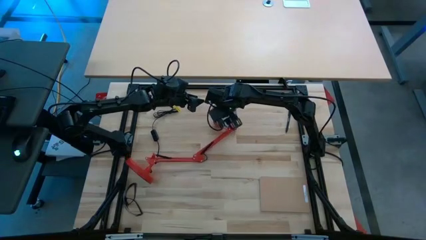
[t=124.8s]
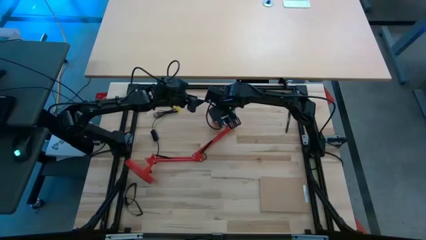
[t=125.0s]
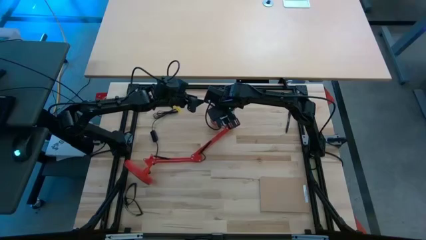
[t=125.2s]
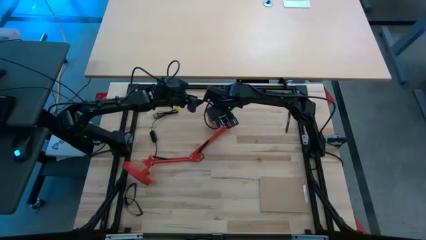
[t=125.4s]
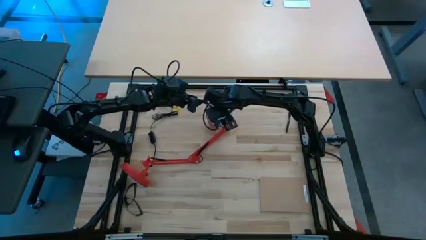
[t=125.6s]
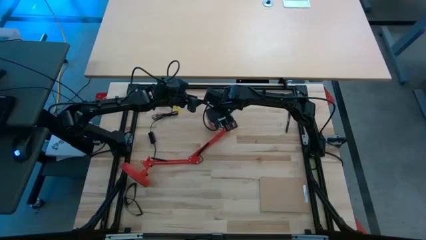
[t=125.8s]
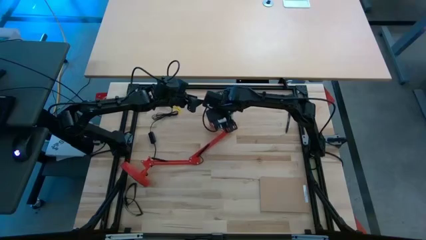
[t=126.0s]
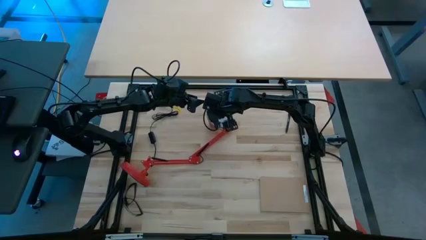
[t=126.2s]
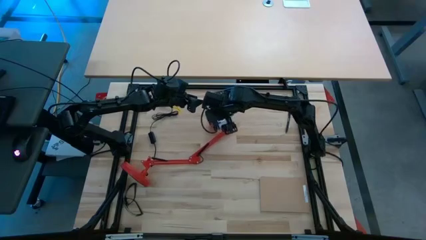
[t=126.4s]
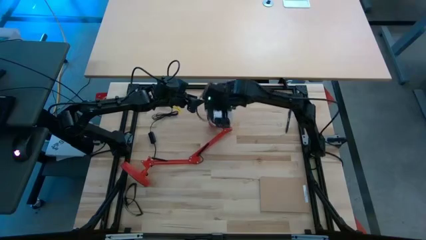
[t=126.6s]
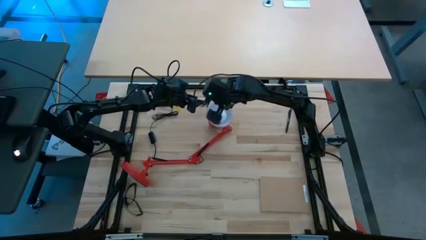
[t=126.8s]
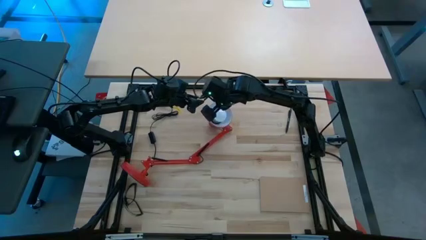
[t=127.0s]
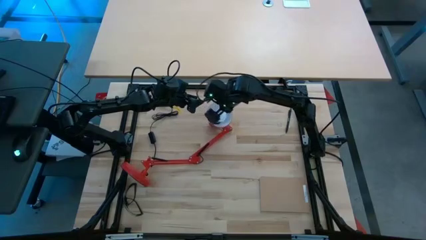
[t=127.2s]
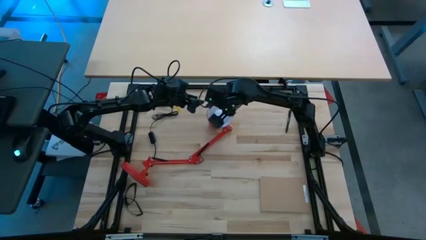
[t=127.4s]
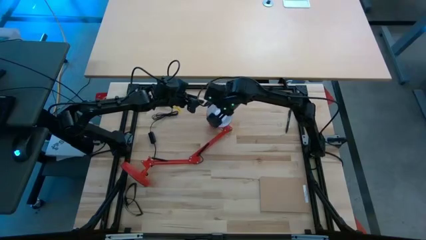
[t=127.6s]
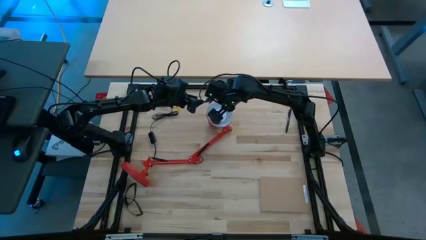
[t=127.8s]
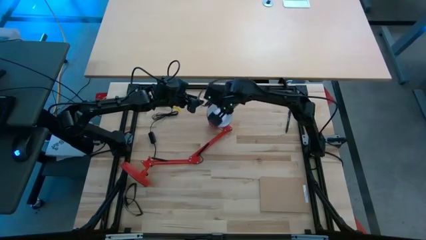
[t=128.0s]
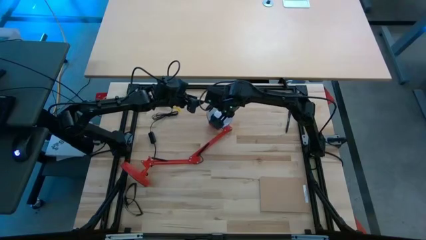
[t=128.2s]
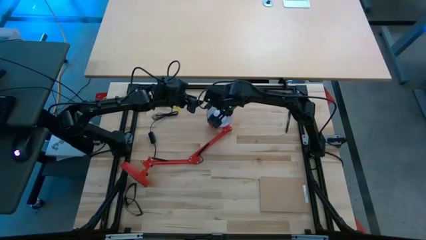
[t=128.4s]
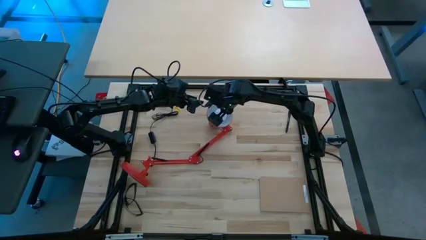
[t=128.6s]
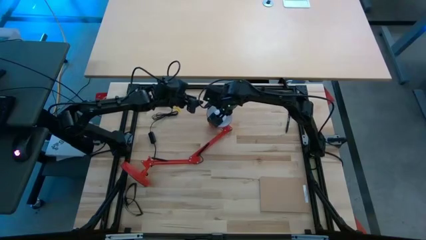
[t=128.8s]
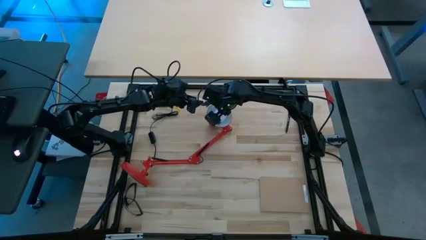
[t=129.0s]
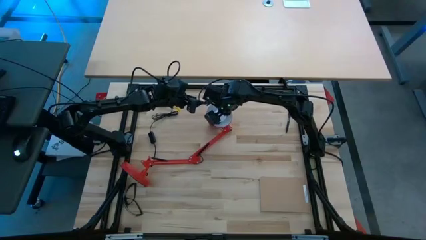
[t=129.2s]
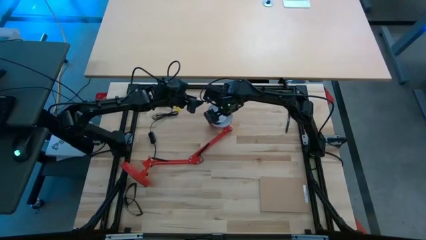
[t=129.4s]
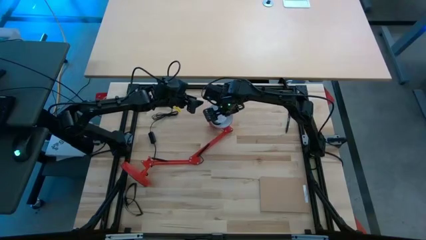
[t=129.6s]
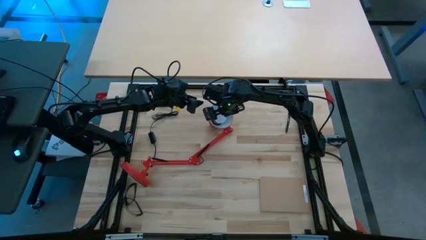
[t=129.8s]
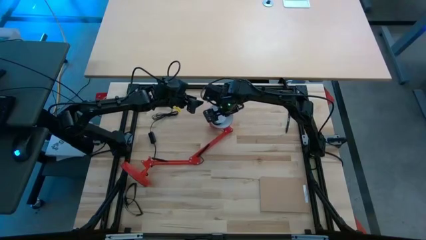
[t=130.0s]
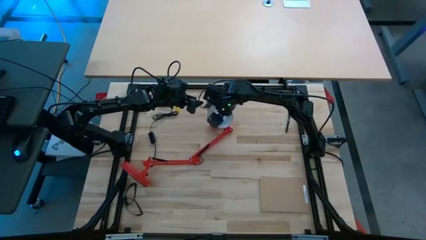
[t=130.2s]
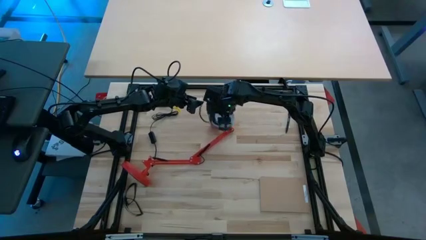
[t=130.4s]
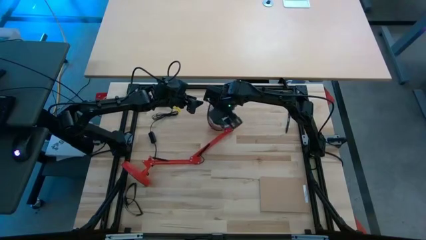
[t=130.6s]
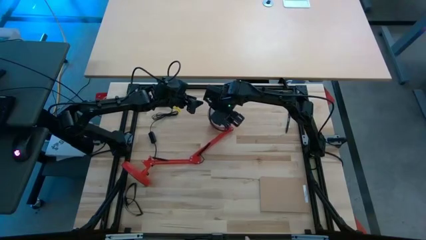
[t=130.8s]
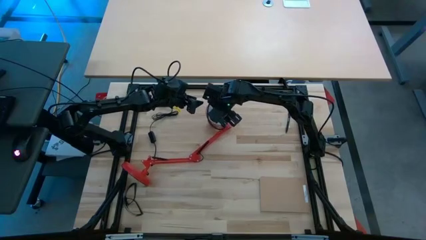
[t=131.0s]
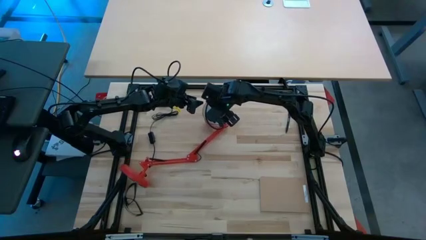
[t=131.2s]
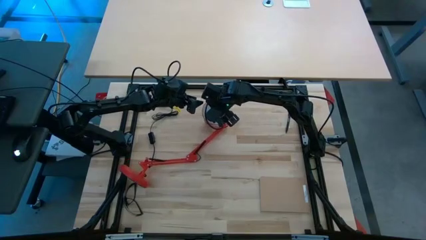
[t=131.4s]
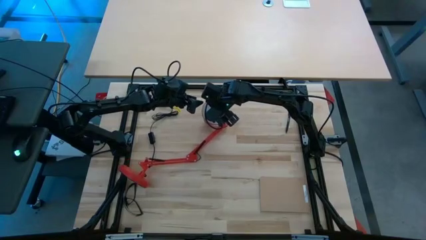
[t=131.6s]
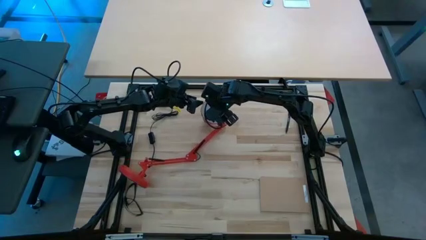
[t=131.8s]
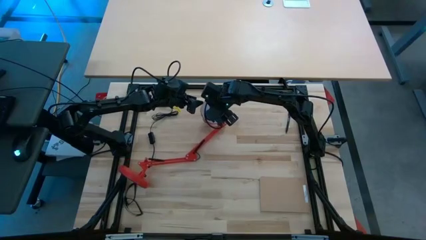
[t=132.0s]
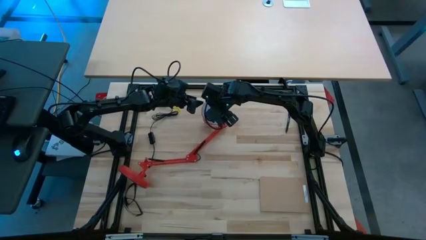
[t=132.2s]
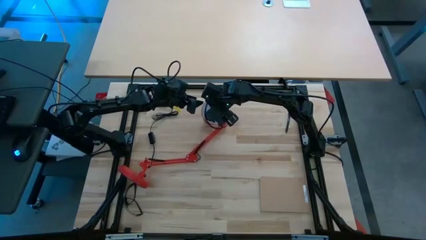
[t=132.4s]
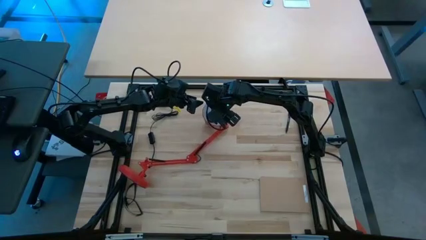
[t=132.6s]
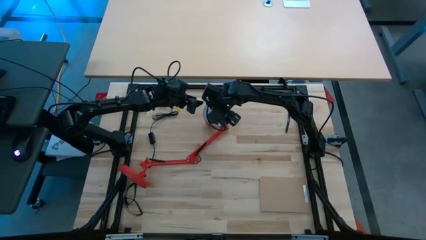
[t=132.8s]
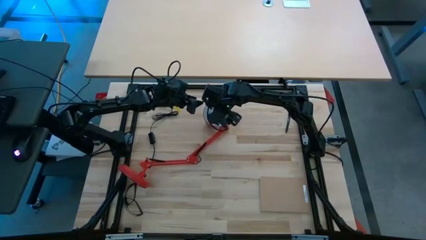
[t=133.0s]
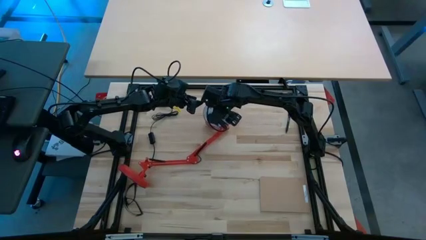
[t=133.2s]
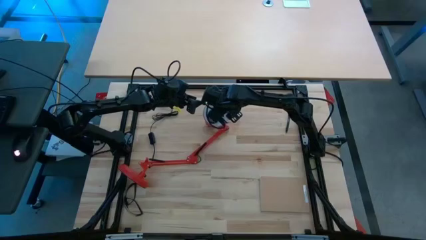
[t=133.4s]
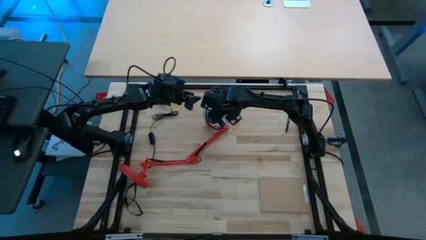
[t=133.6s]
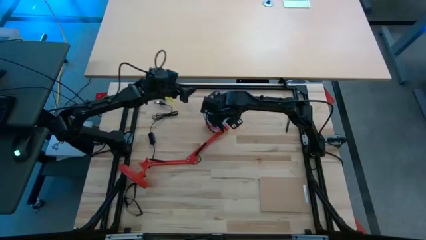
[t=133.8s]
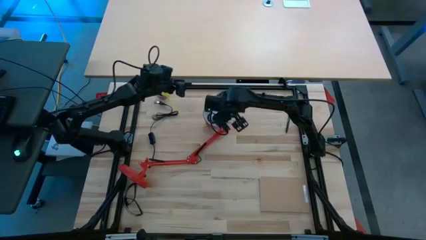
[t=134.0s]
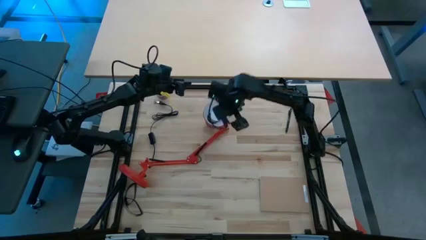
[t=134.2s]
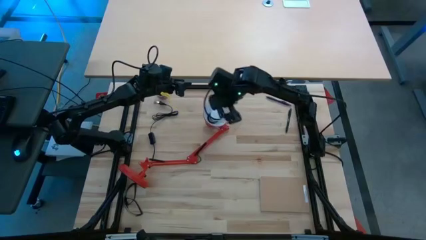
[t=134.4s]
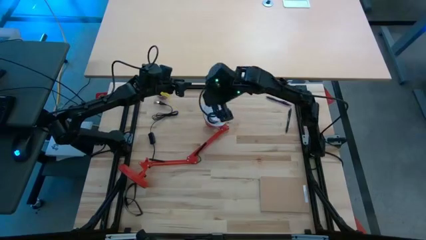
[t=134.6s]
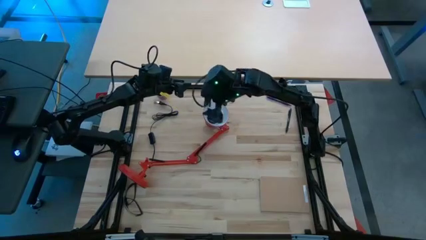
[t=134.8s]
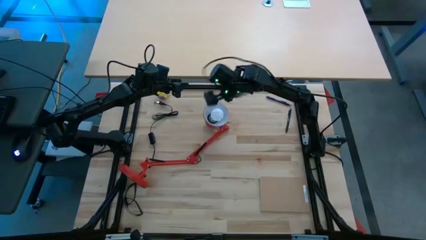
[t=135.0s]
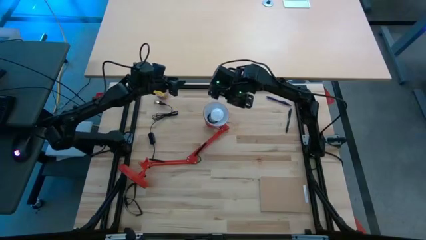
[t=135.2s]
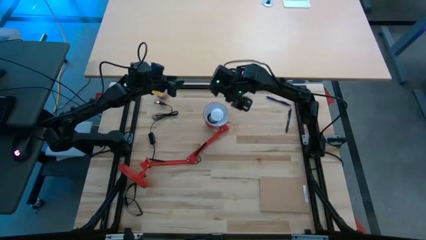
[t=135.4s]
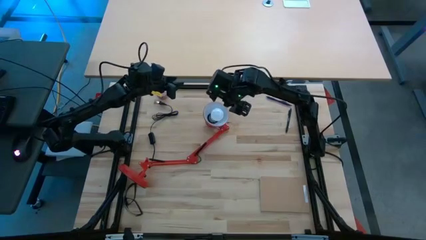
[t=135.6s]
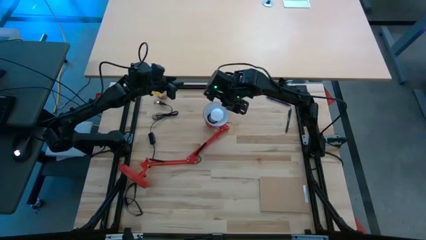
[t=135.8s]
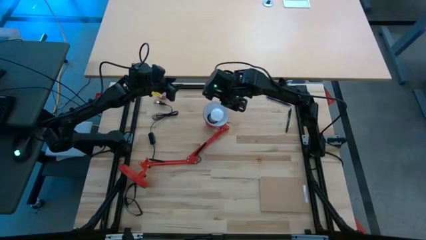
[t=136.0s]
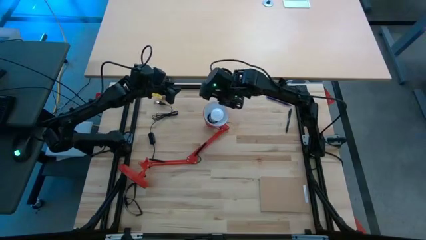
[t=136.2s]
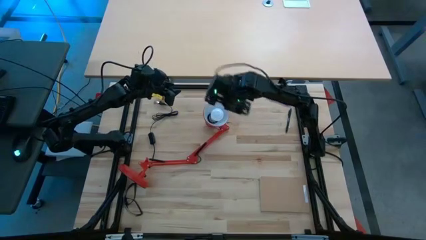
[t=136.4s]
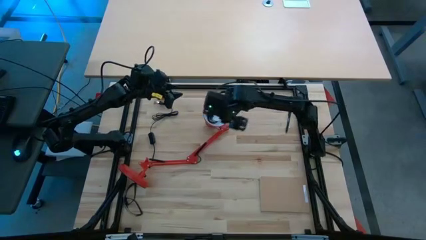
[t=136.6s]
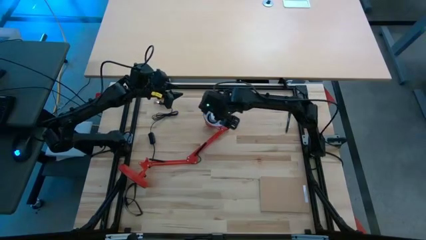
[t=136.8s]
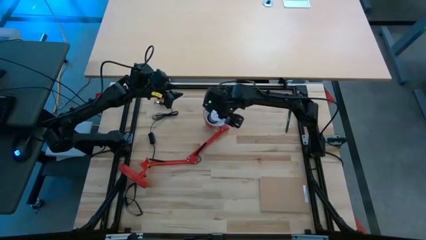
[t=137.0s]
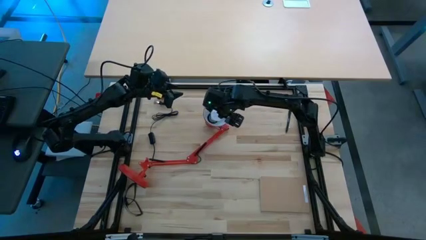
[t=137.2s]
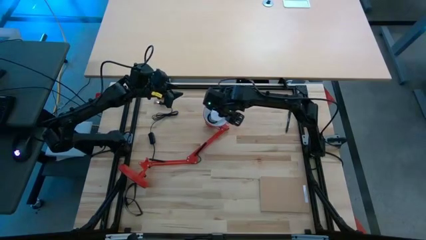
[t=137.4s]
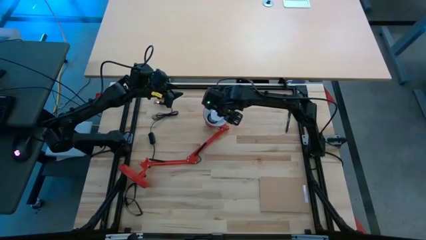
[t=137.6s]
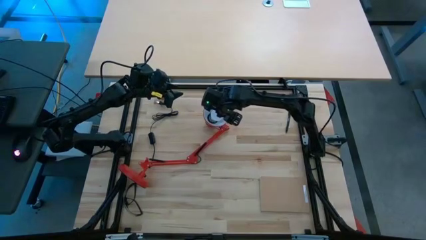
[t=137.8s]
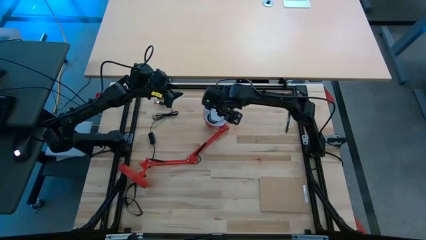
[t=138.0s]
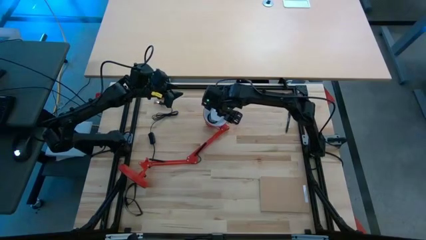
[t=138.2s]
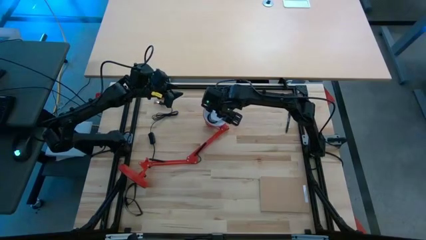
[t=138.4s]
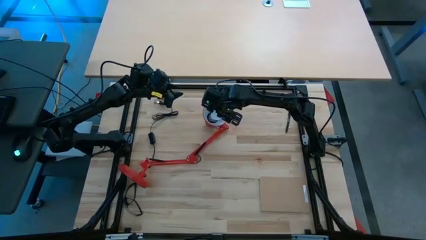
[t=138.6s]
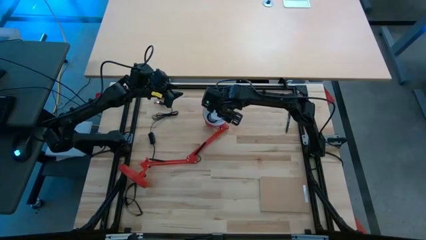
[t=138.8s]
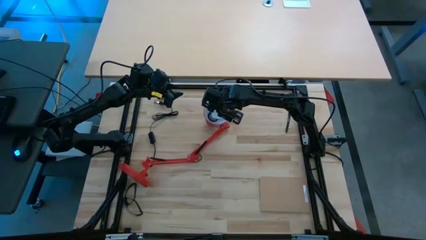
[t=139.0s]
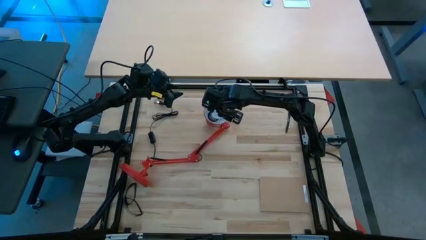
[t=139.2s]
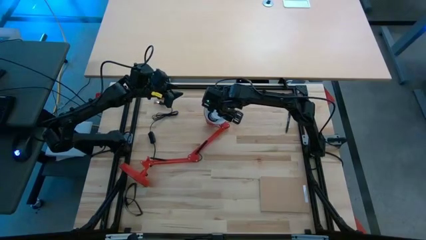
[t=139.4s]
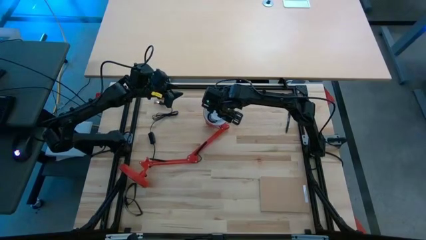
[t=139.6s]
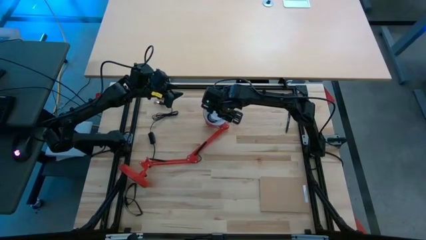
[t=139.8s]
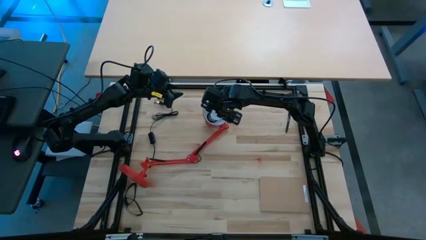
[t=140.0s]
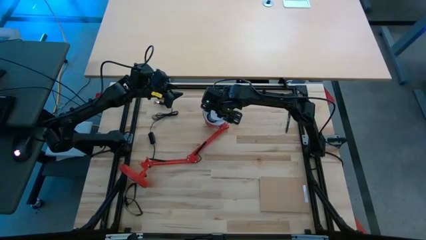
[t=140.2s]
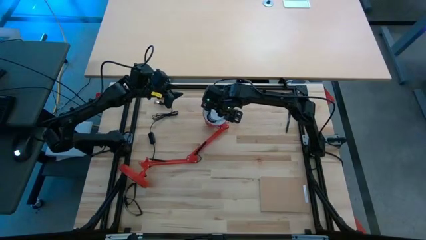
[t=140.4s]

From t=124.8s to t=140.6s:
Task: Screw lightbulb
Remove the lightbulb from the desk lamp
